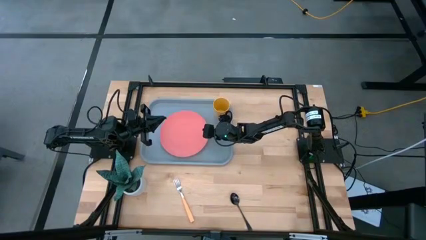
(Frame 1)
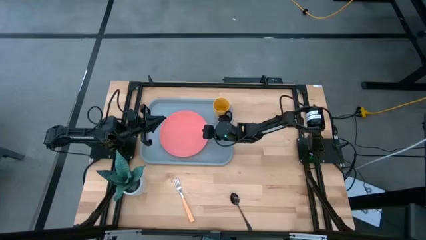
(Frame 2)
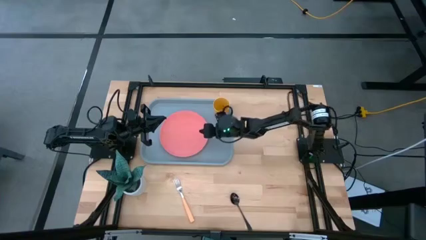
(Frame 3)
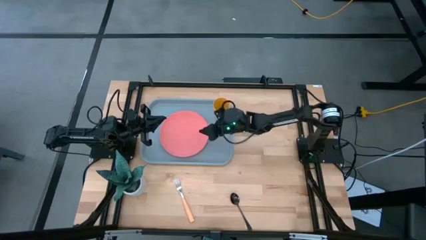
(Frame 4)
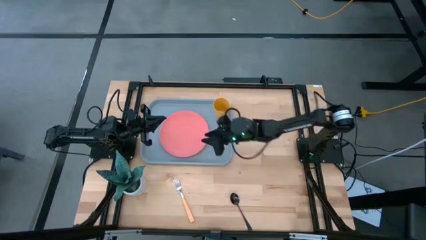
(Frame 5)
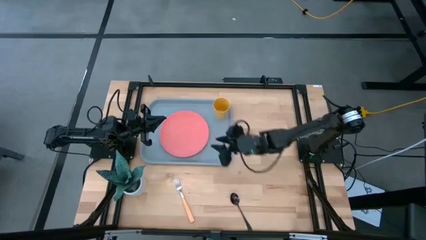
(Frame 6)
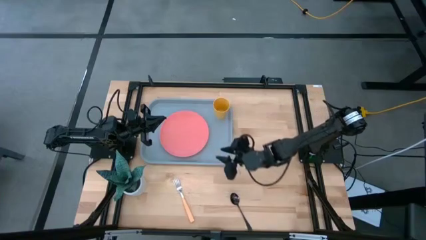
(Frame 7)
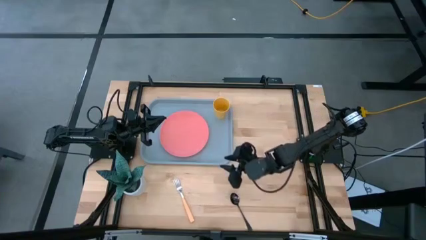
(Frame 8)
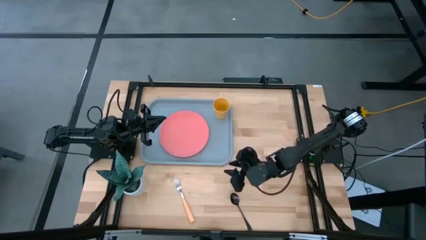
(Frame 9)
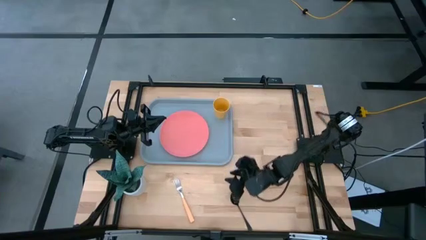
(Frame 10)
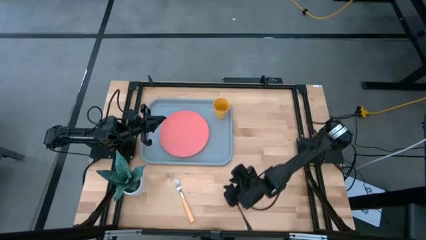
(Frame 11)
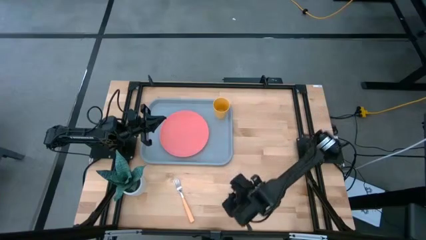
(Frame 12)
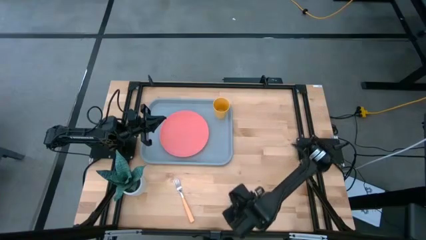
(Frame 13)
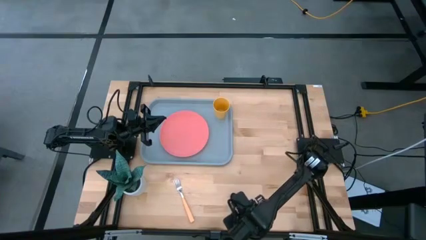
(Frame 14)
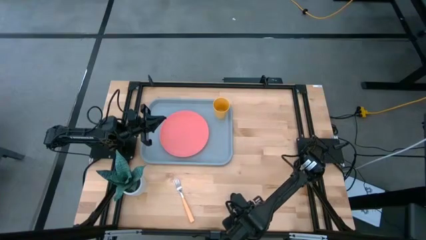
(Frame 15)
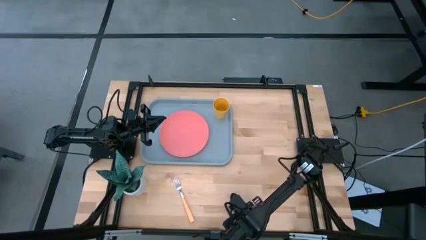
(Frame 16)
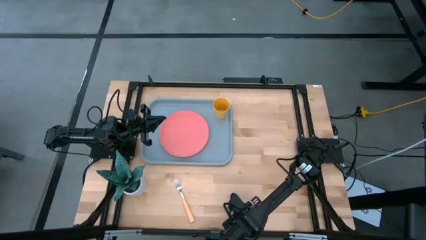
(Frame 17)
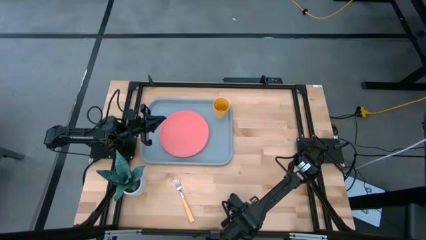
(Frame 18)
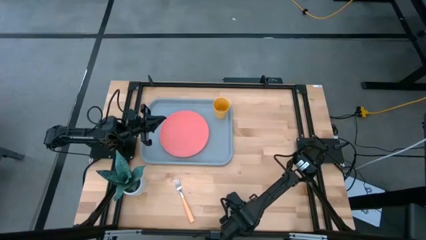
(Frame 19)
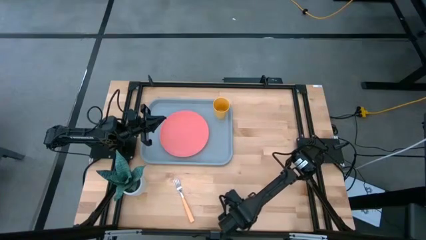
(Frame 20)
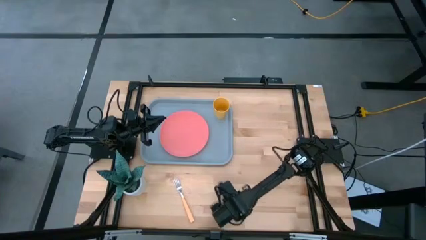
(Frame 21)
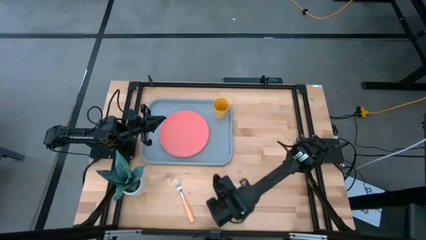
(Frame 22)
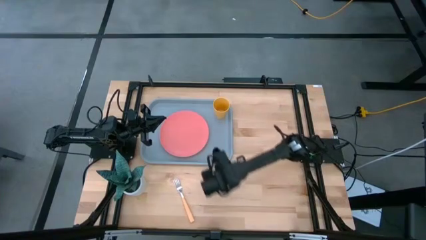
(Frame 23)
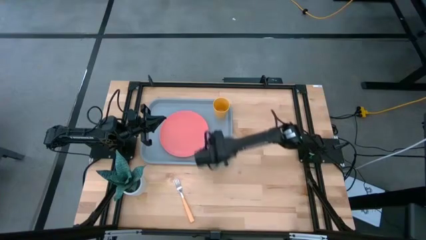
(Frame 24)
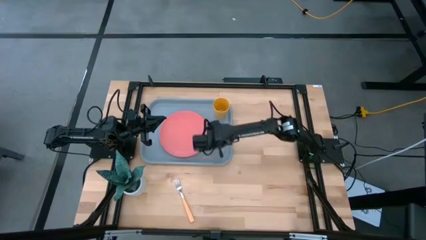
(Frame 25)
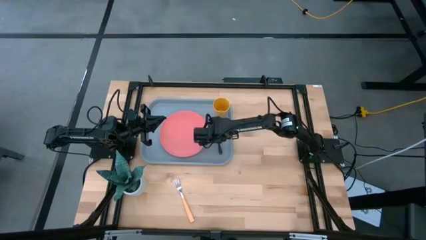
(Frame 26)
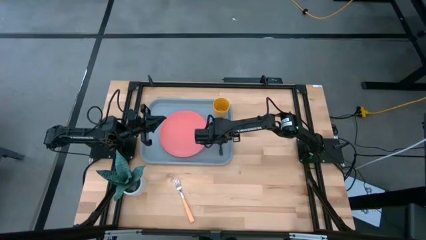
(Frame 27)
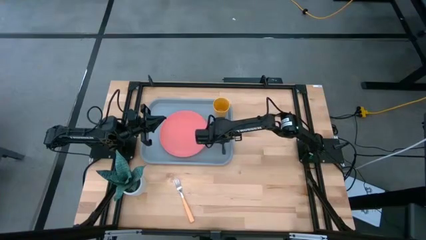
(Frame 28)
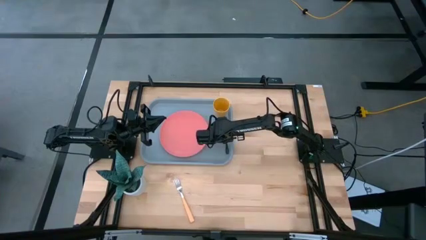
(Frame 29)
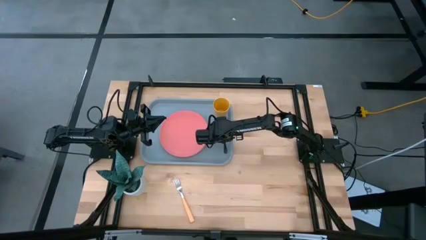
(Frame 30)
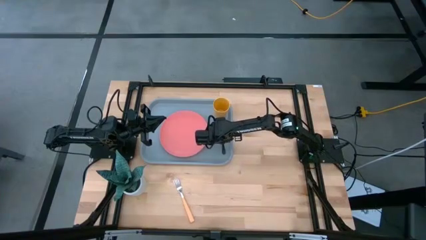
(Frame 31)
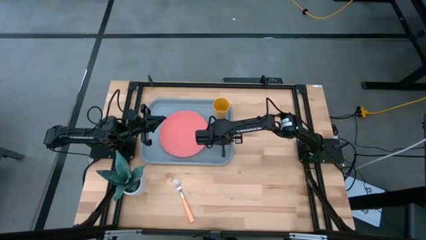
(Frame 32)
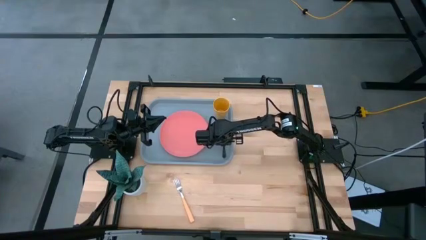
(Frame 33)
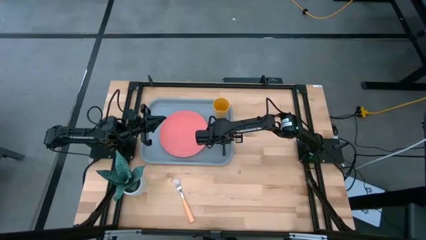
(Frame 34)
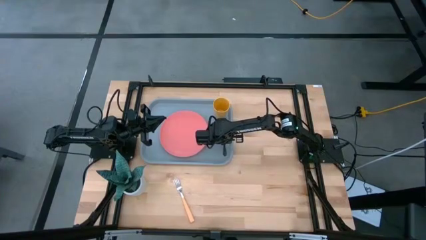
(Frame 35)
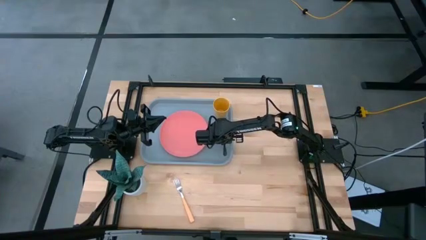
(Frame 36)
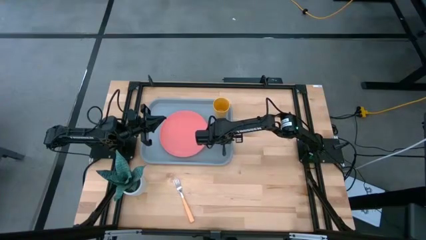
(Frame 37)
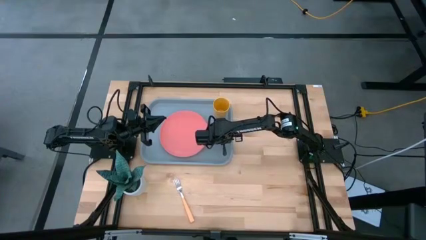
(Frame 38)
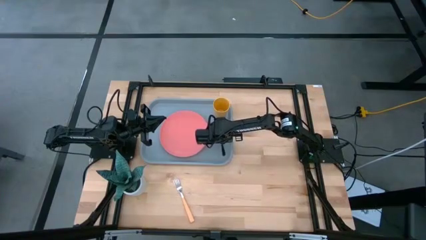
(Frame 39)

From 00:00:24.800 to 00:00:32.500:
Task: Pick and place plate/cup/fork/spoon on tray
Put the black spoon beside the pink plate on the gray tray

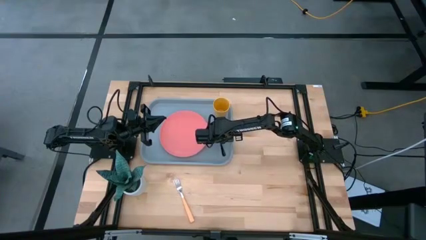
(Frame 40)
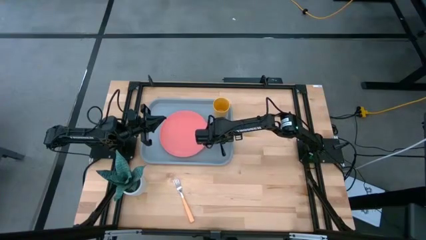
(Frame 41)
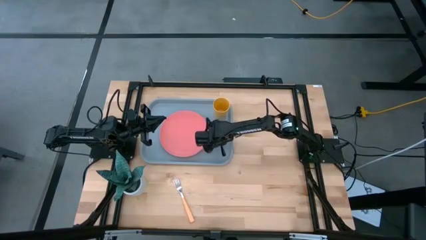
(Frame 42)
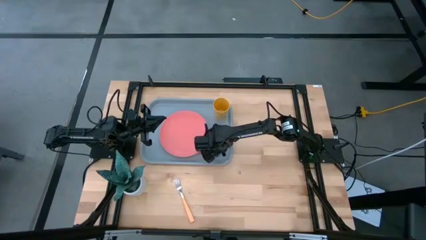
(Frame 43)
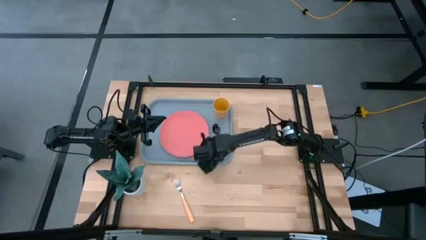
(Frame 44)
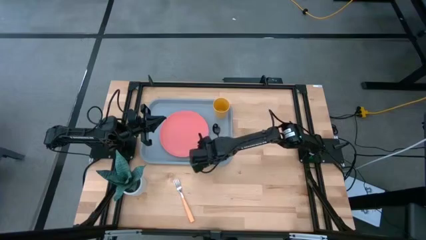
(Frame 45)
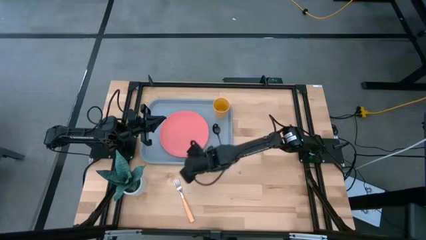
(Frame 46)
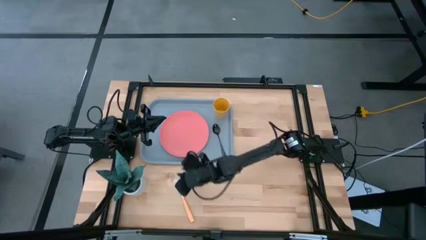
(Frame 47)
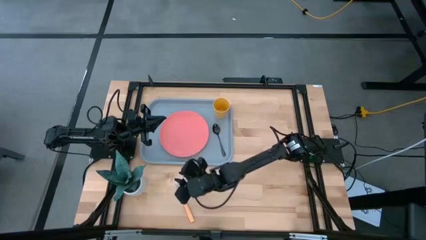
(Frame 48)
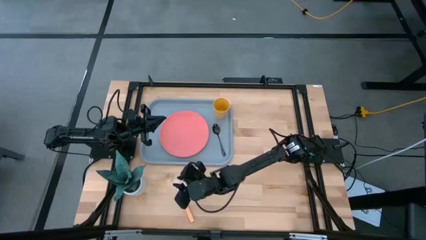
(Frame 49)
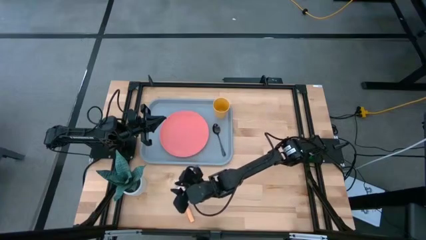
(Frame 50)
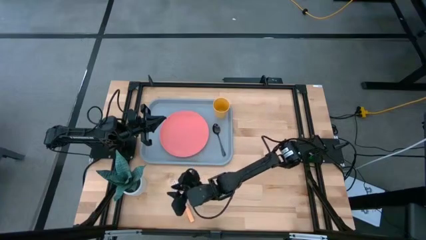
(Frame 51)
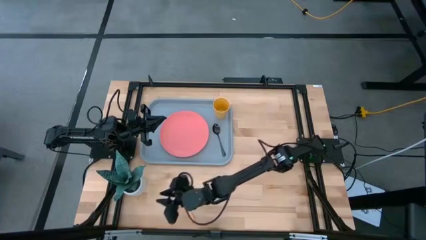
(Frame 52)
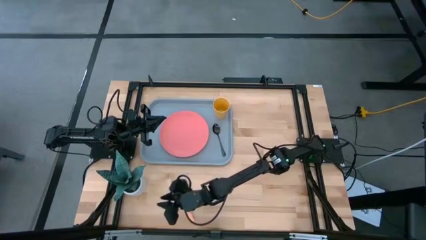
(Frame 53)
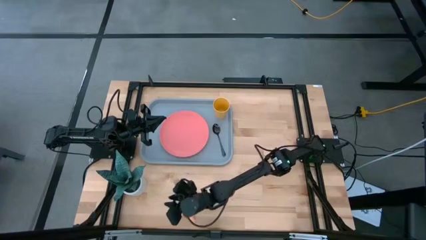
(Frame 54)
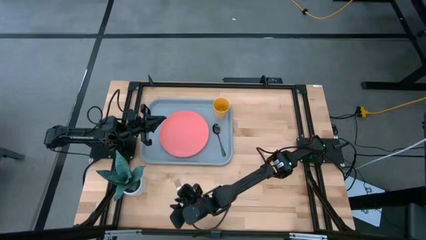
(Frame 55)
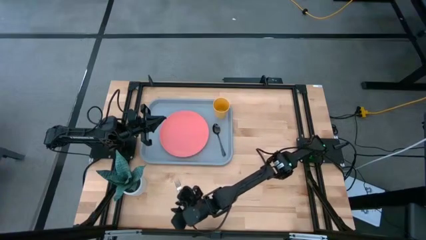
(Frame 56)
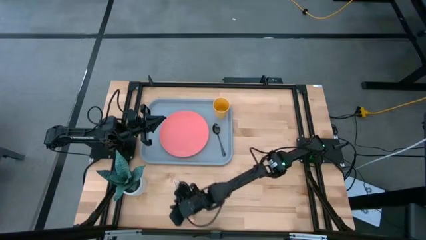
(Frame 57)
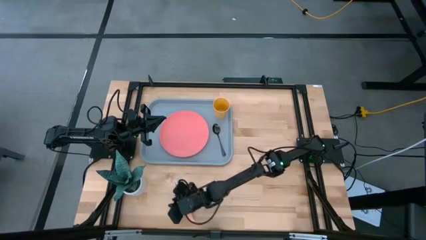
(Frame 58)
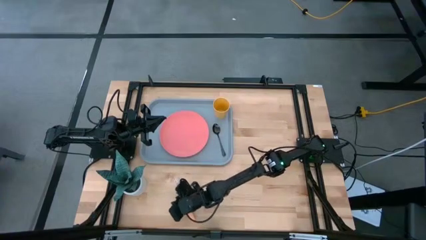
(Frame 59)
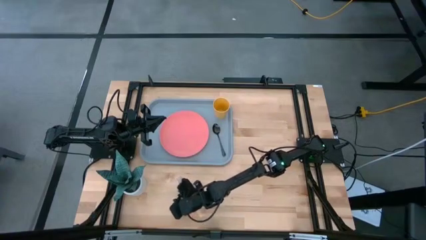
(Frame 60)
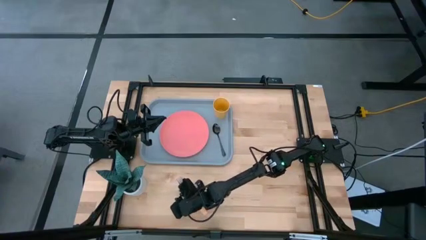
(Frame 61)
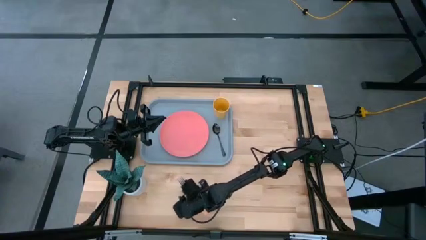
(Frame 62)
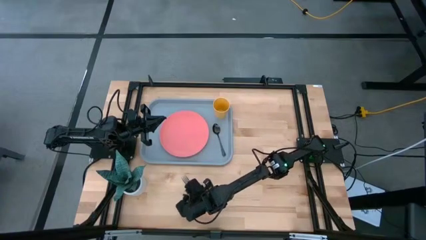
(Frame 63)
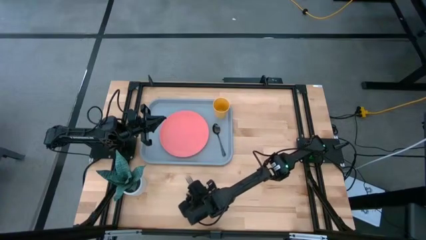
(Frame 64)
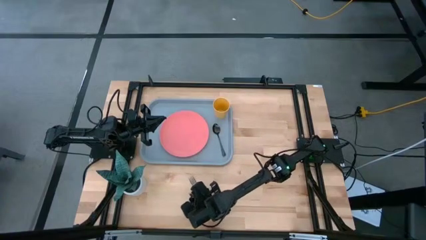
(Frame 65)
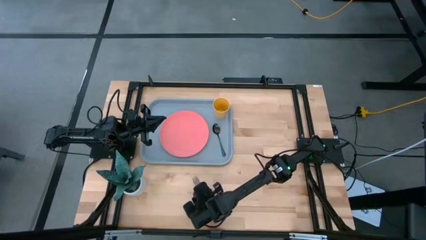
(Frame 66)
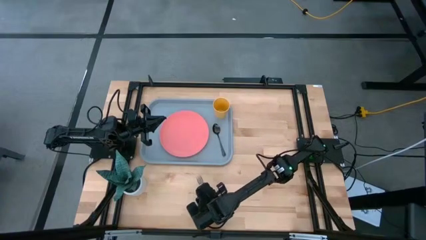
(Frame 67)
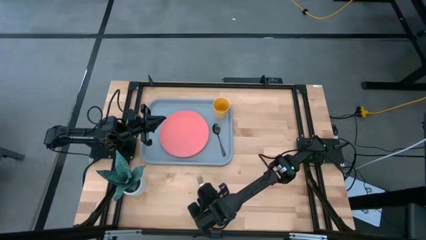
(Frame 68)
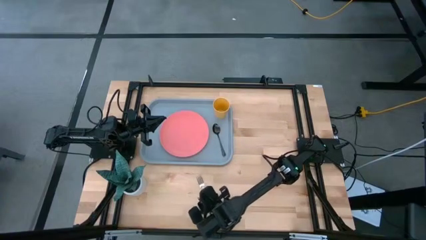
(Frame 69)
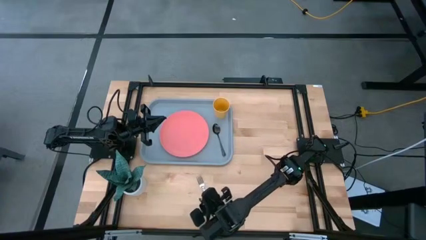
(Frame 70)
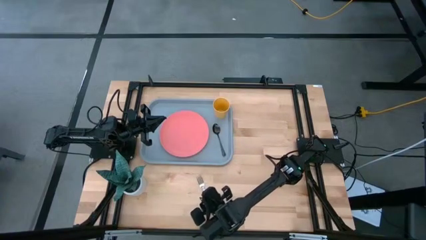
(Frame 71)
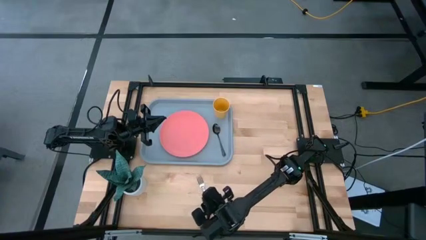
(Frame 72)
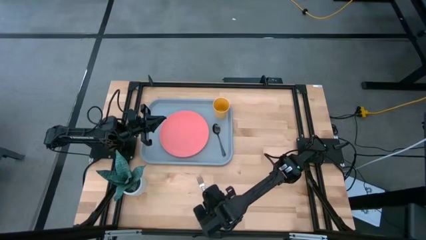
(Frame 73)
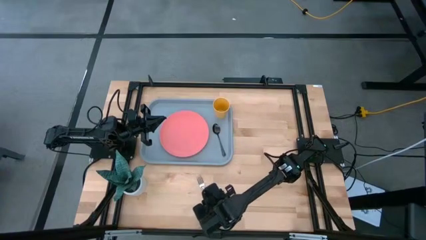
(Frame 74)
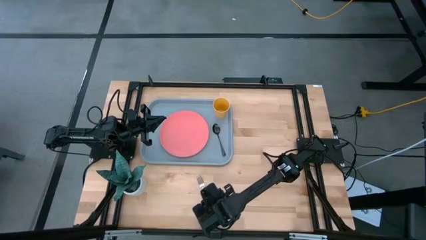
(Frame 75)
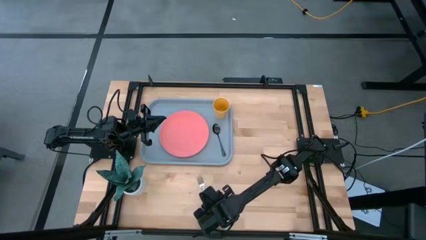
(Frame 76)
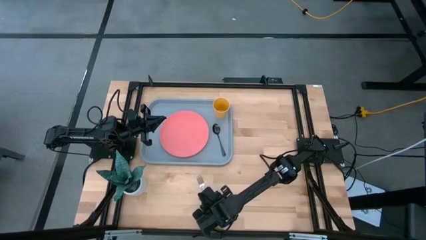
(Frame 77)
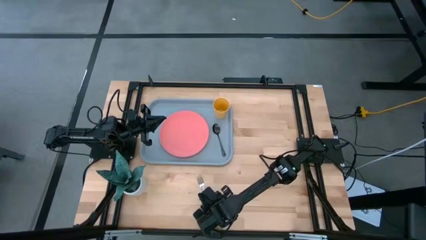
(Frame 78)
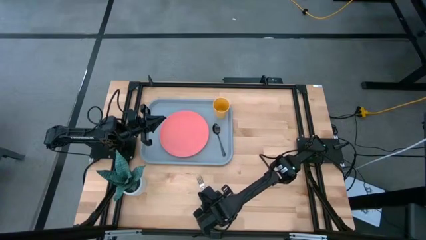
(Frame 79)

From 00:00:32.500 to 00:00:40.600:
Adjust the orange fork
